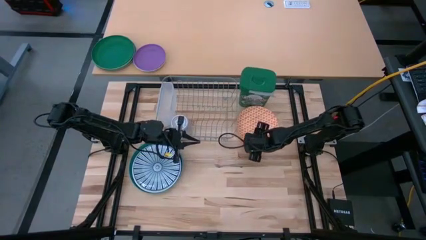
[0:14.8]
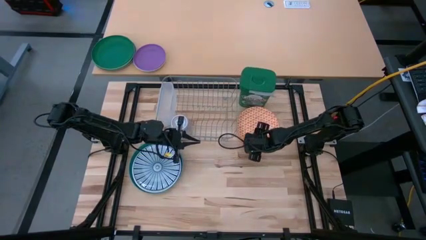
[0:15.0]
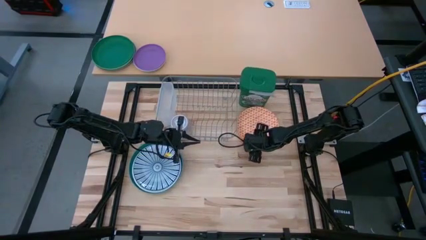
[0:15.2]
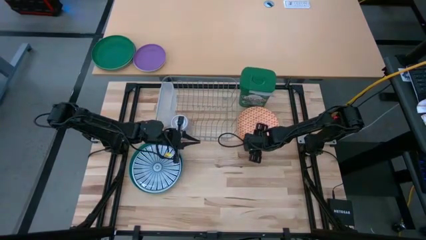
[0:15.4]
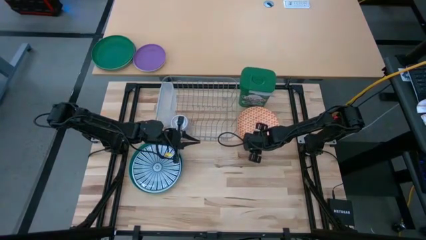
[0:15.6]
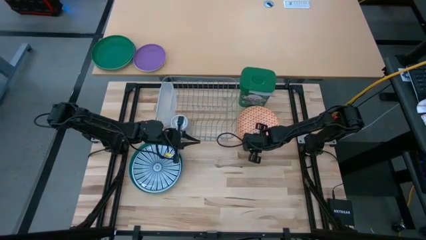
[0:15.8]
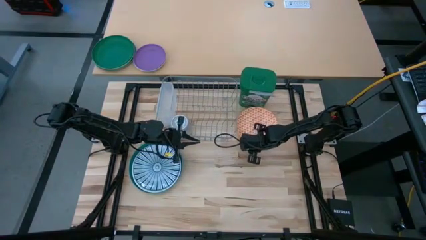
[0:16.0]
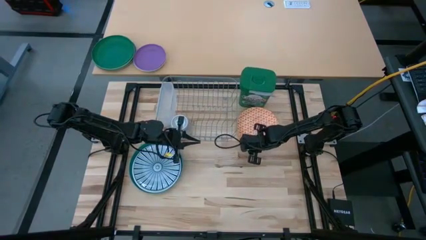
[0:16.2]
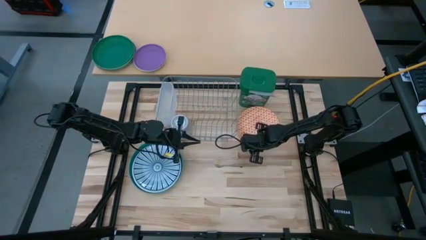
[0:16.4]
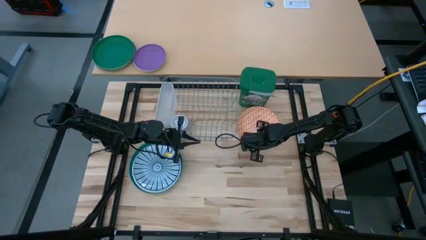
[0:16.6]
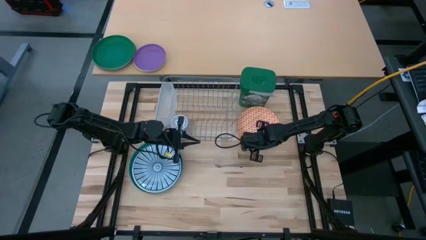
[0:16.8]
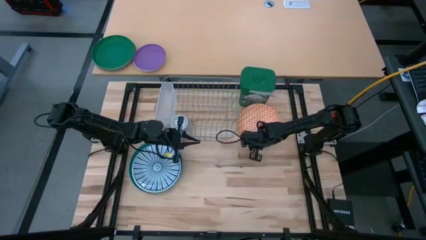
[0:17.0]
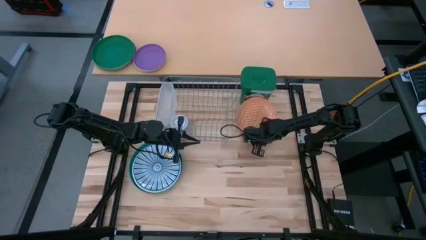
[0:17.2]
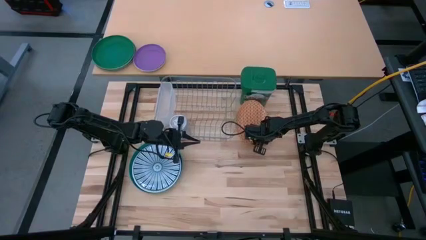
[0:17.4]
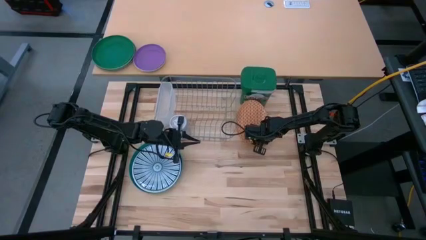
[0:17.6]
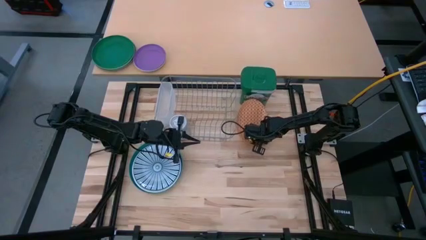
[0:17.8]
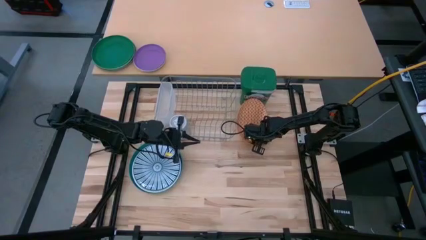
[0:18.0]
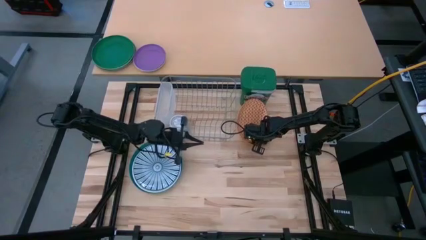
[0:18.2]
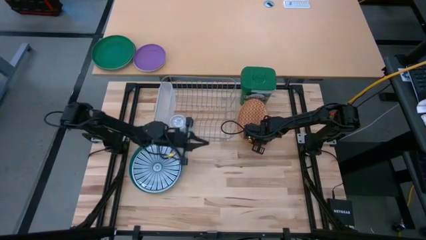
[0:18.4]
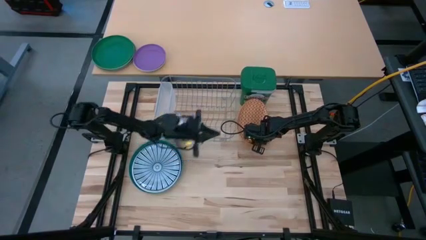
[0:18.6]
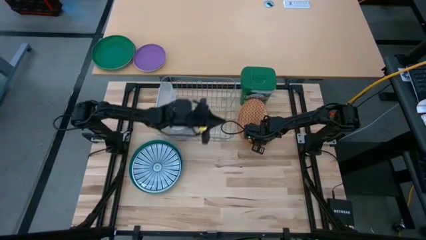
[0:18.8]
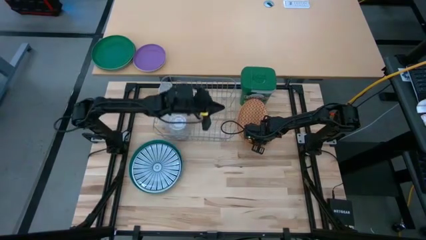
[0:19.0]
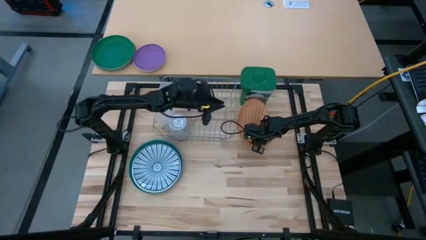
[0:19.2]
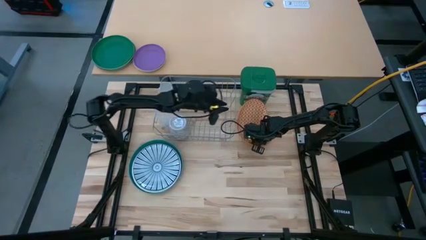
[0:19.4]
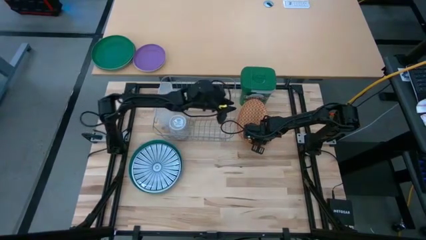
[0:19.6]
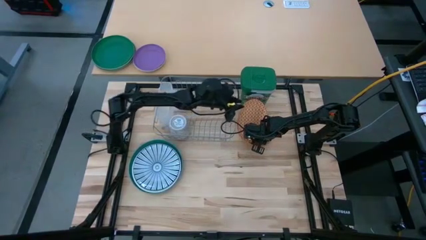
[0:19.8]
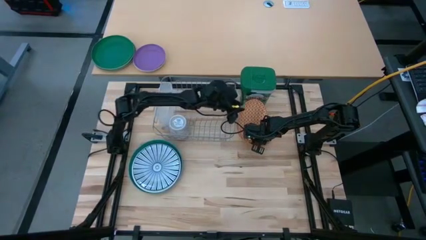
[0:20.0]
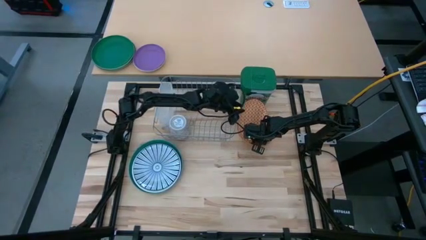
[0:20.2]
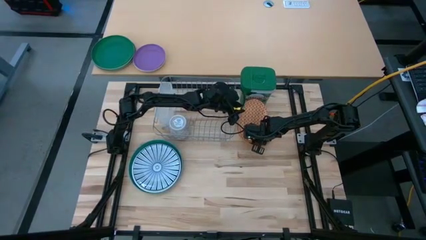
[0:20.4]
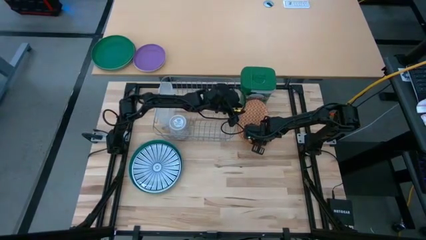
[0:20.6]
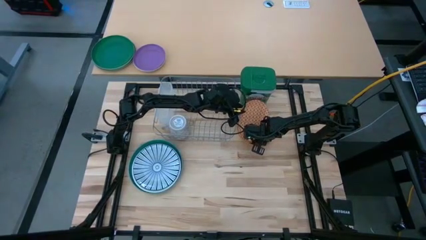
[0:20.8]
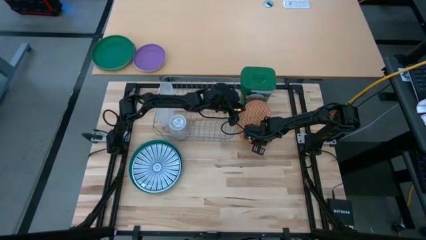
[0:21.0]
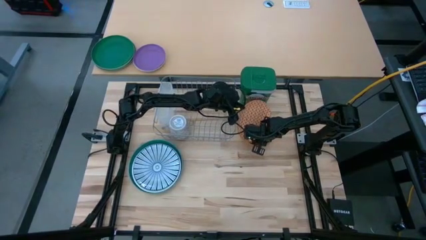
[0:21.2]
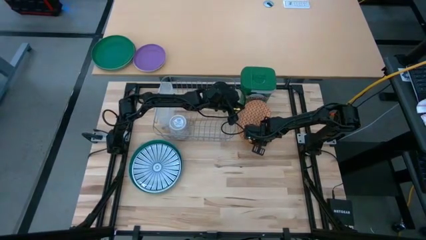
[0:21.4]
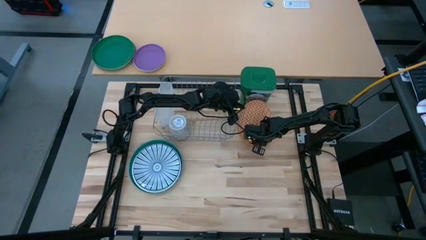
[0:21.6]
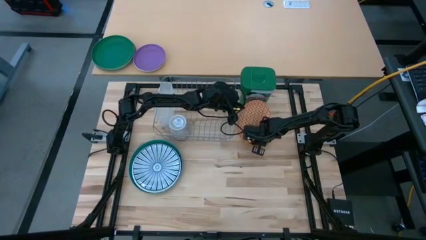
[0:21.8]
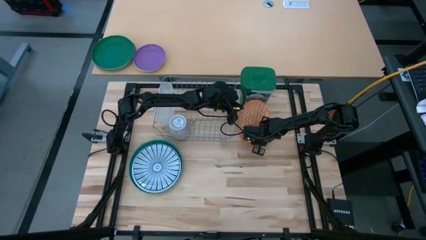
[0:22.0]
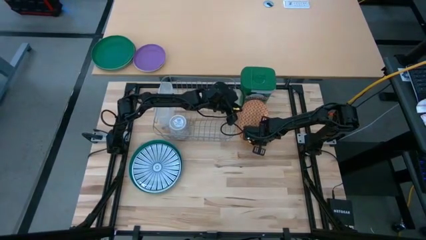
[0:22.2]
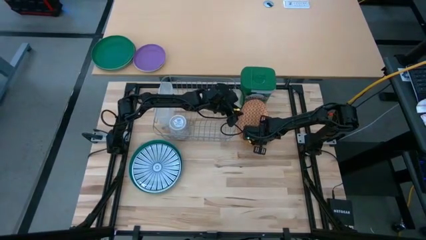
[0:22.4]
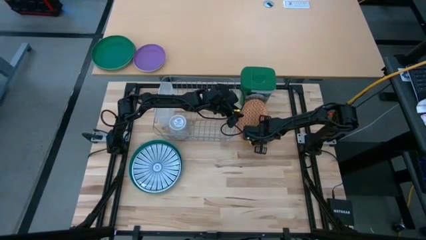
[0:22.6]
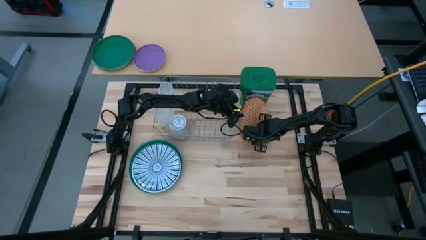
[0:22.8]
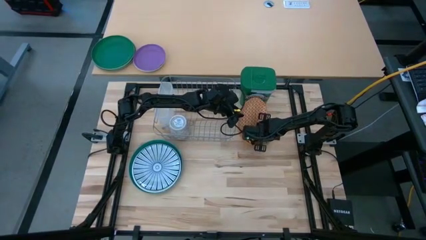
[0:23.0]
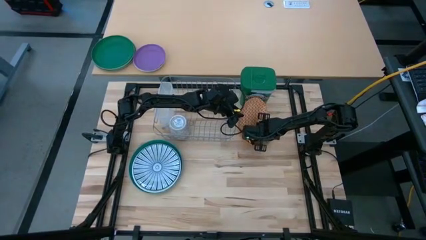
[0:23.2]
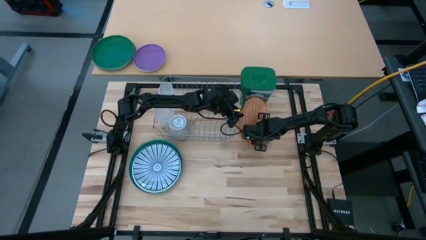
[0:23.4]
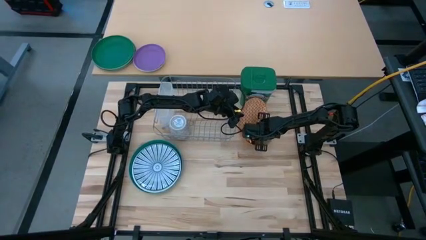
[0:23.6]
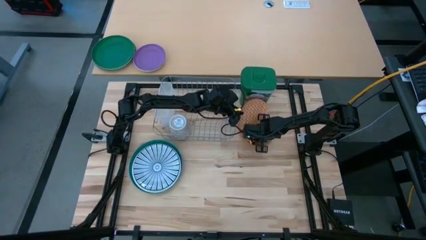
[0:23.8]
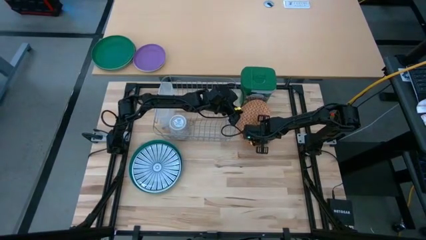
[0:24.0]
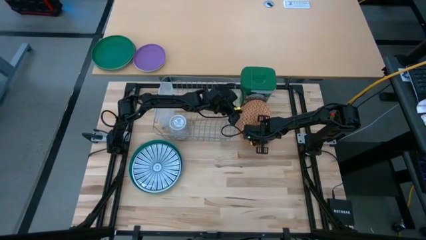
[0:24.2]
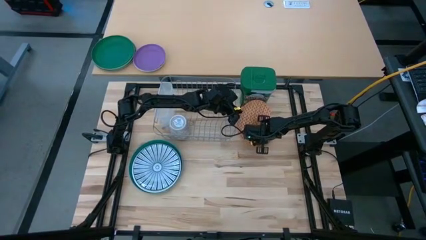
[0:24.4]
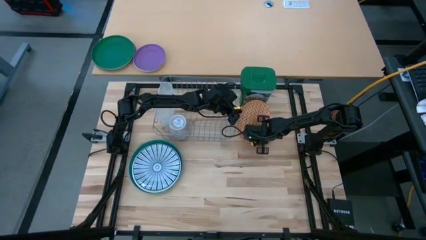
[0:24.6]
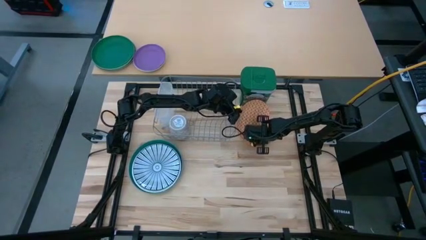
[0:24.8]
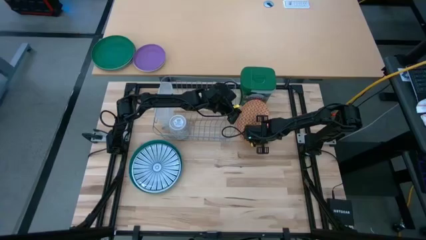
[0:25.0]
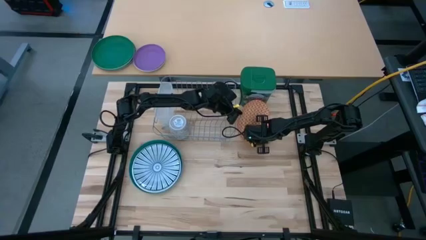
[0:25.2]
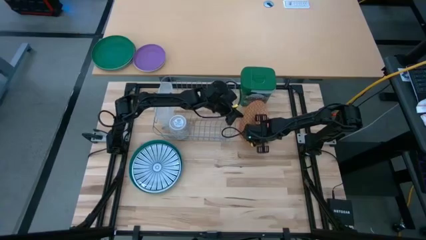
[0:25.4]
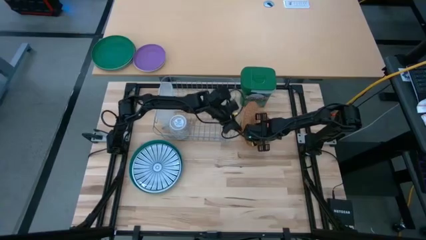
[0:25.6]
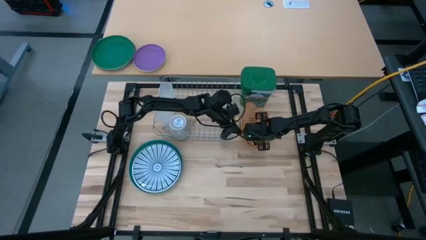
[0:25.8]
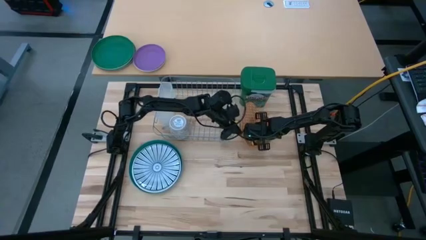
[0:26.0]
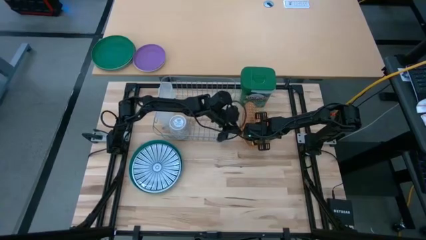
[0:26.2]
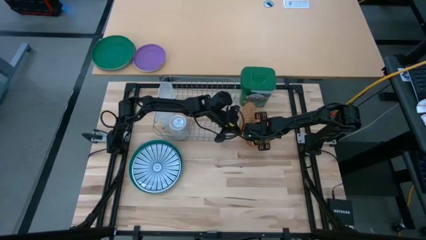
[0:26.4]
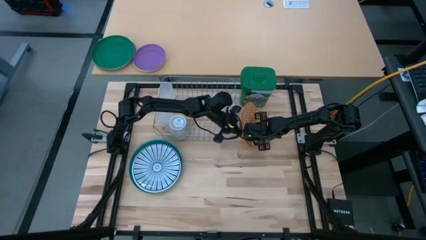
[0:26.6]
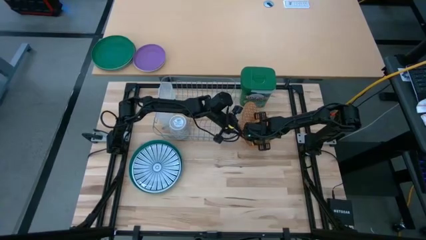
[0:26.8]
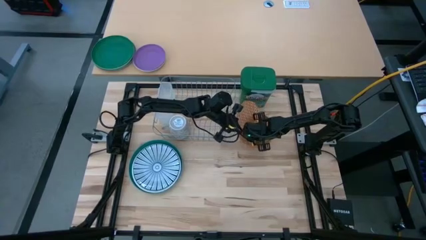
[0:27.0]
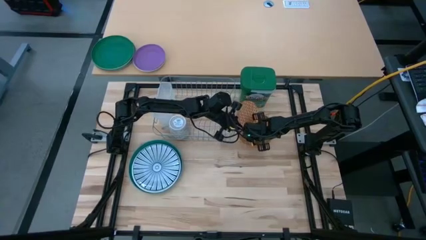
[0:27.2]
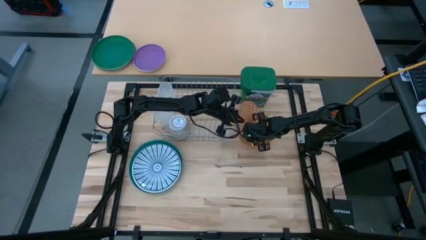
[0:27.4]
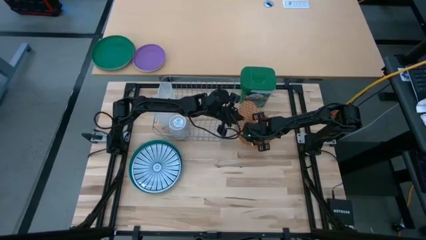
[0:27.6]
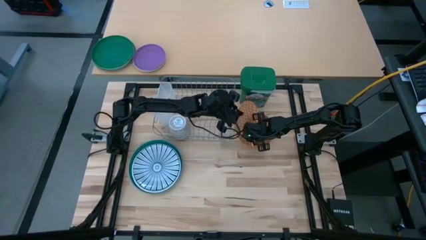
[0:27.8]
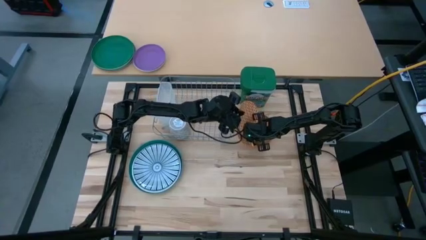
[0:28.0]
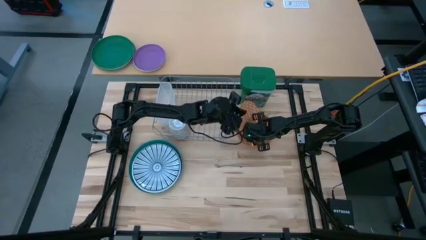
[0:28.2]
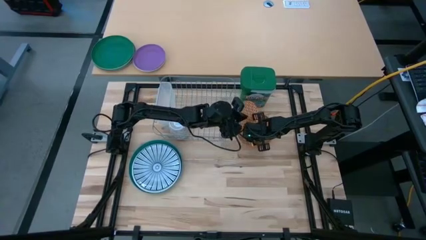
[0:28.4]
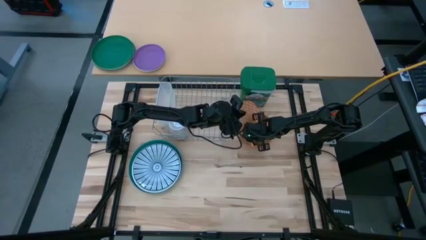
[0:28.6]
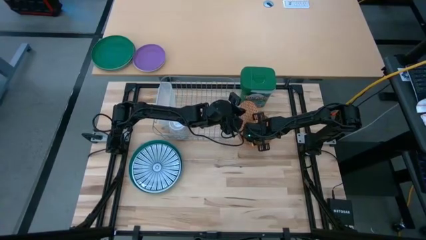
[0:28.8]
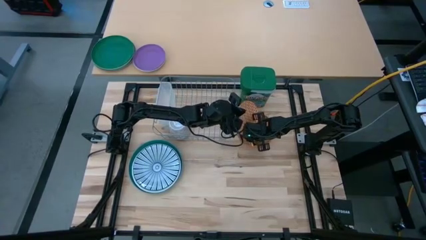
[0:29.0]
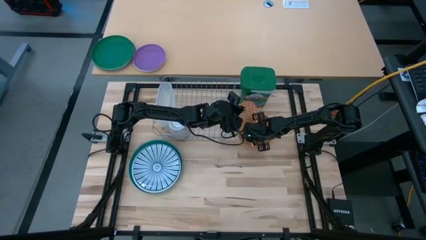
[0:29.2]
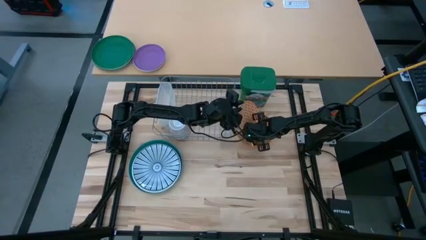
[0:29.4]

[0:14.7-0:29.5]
Task: Sort dishes
Put the orange plate in the dish rack

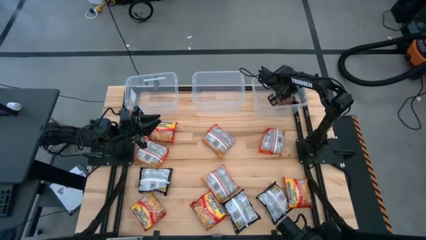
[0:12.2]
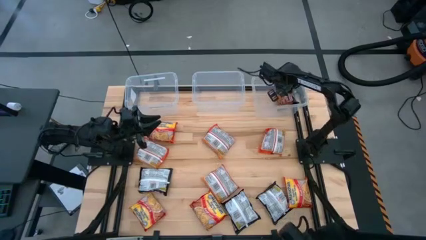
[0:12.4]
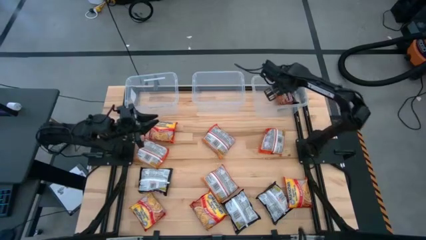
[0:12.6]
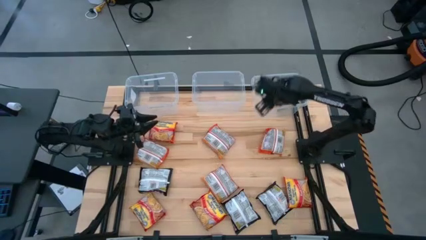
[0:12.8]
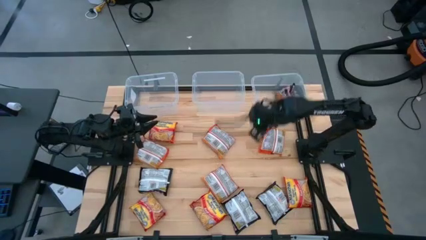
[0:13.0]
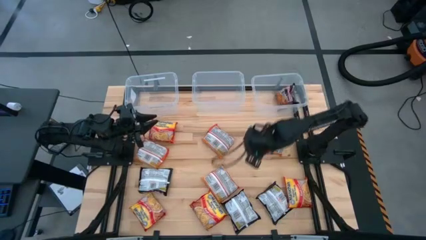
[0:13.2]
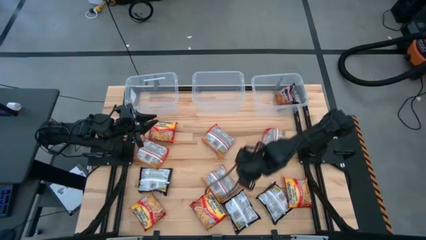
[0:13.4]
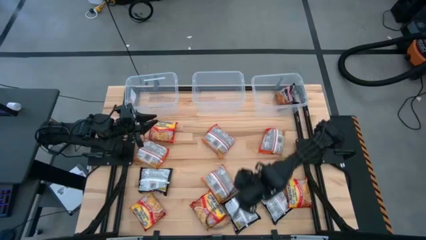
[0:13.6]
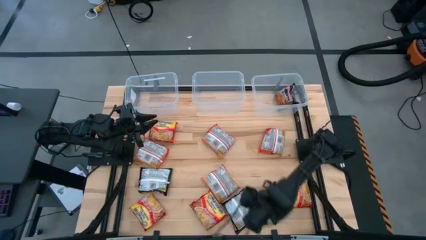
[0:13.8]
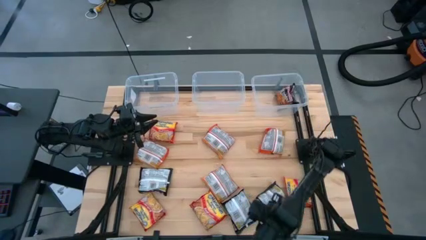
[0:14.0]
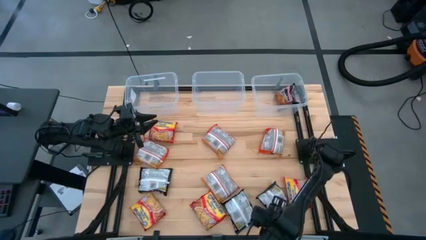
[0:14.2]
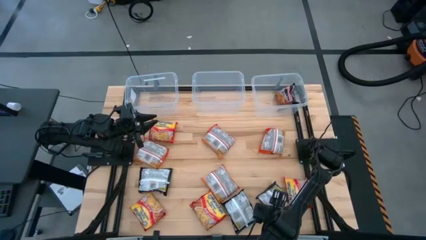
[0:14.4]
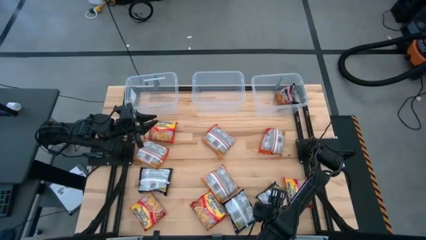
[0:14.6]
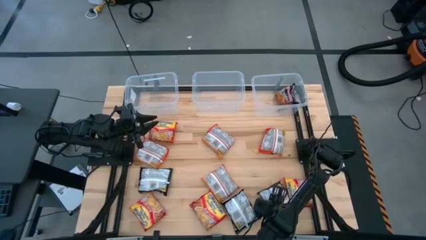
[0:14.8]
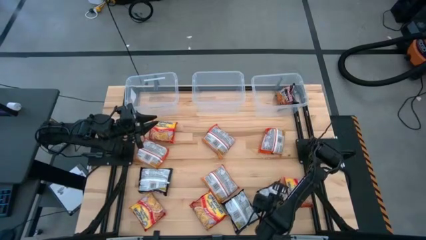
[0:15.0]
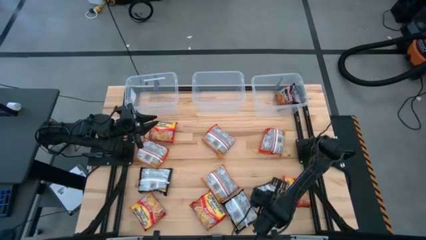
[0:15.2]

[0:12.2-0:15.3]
Task: Sort Maruchan noodles
Put the black noodle pack into the top right transparent bin
